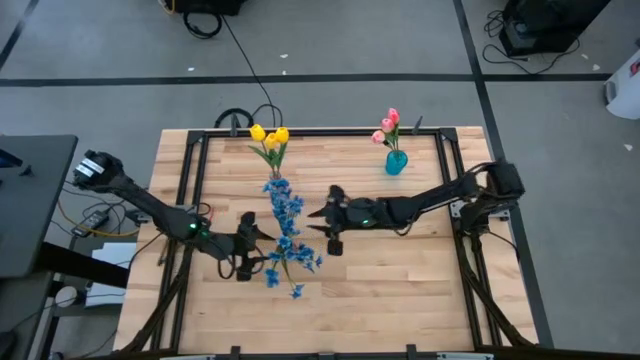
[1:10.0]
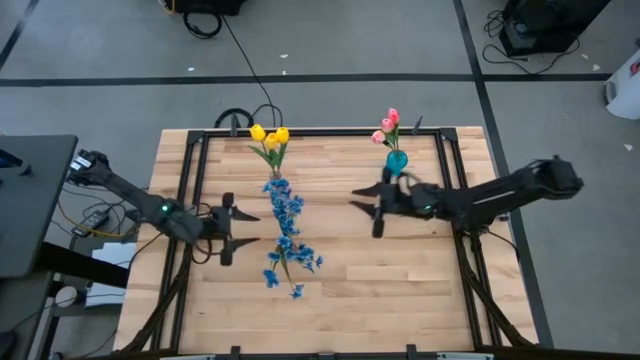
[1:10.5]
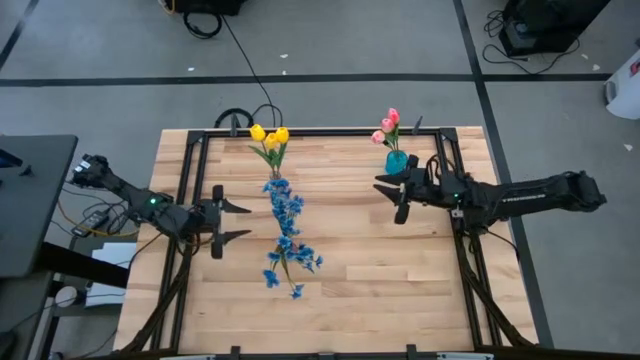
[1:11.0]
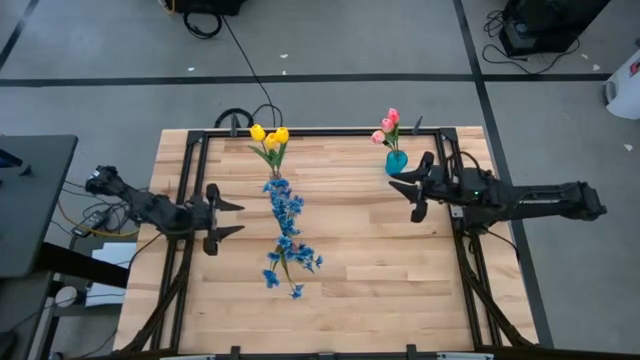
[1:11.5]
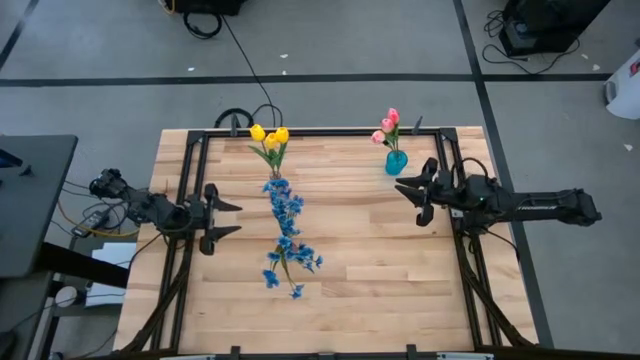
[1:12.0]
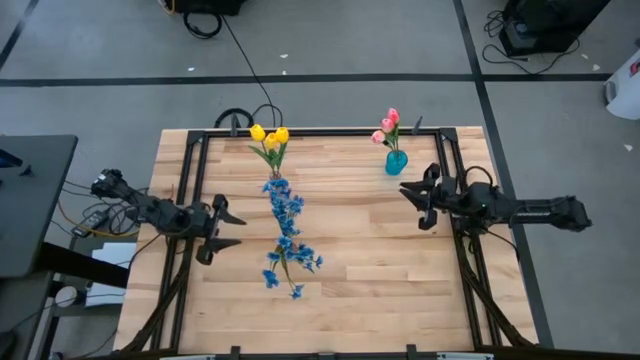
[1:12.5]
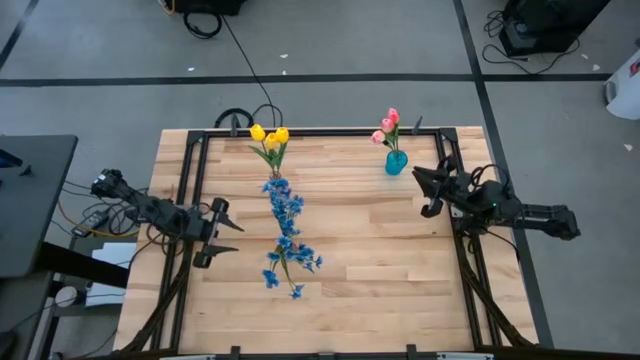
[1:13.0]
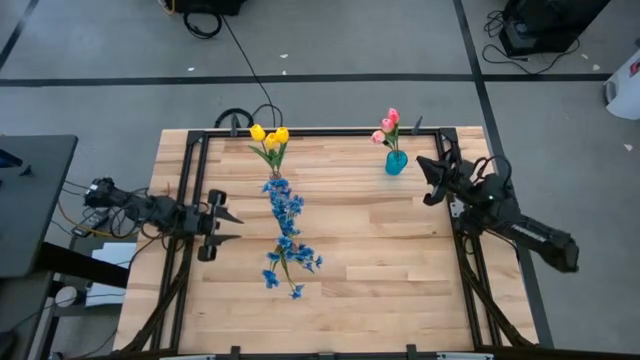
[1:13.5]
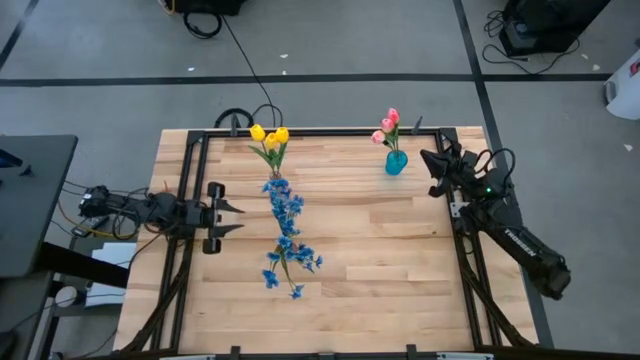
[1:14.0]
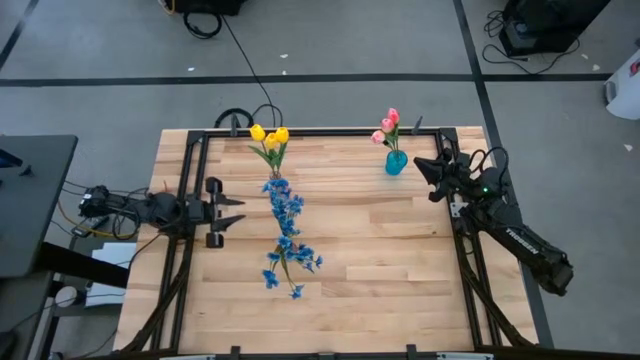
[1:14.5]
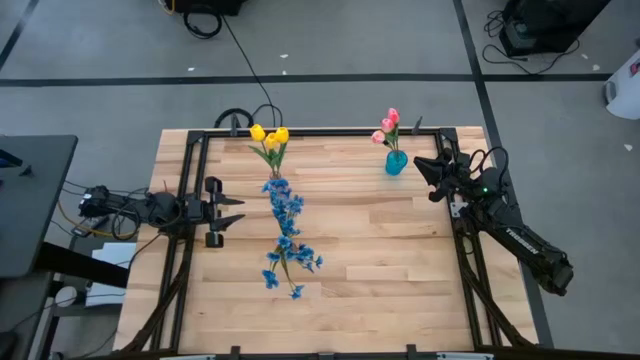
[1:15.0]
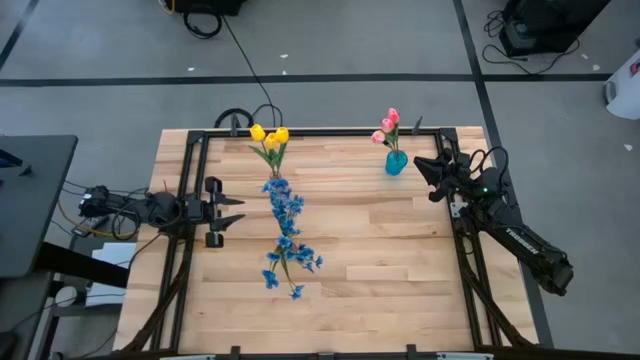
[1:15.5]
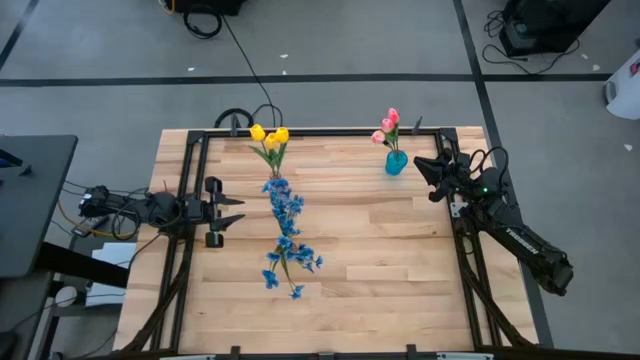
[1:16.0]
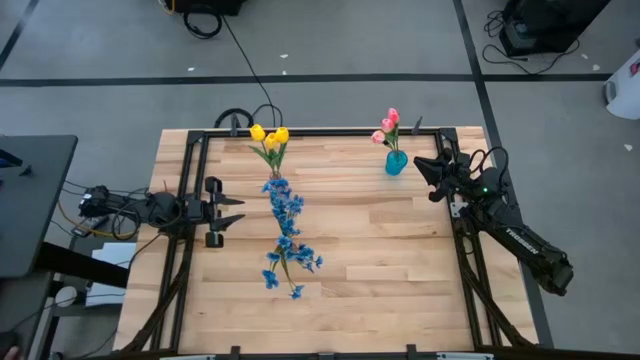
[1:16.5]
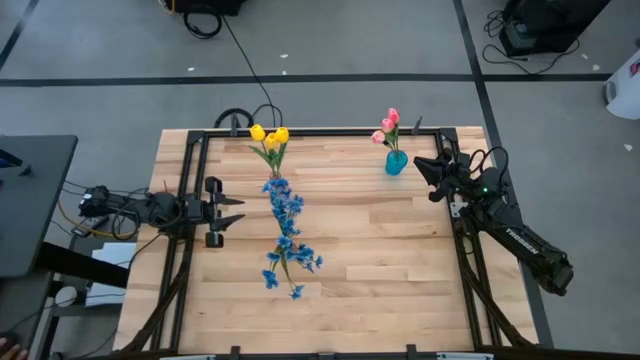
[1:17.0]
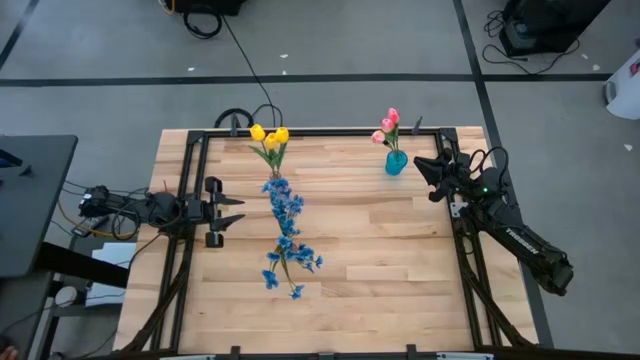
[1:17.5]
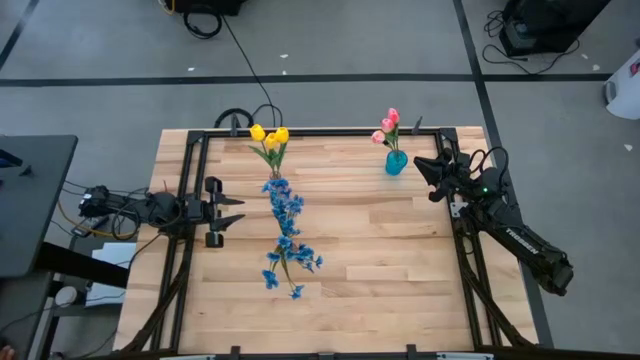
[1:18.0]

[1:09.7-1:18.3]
Task: Sort flowers into vase by color
Return to Home Position

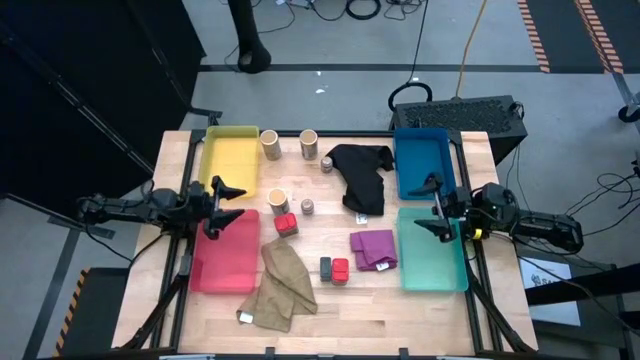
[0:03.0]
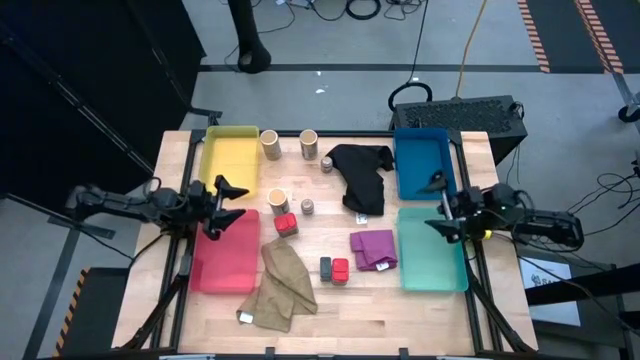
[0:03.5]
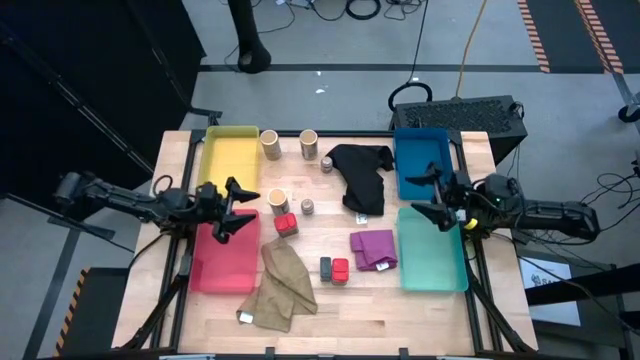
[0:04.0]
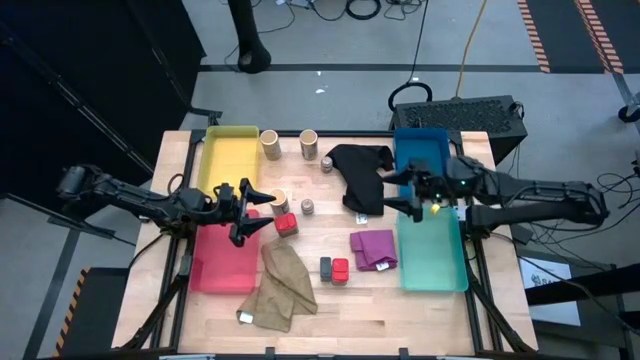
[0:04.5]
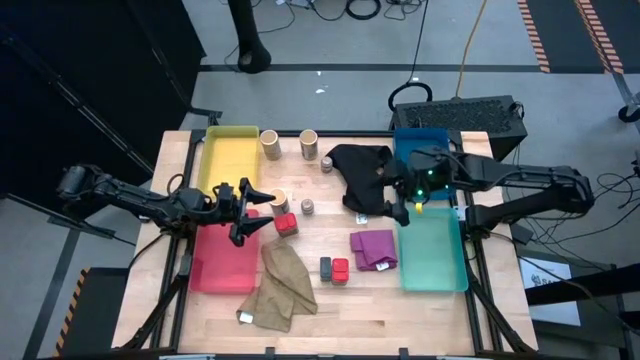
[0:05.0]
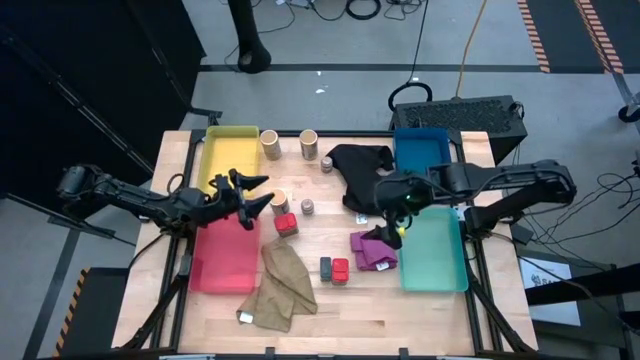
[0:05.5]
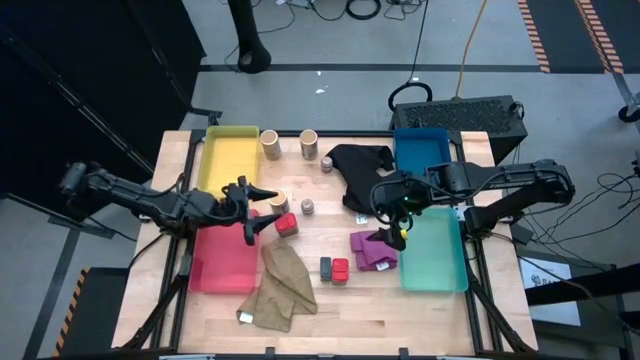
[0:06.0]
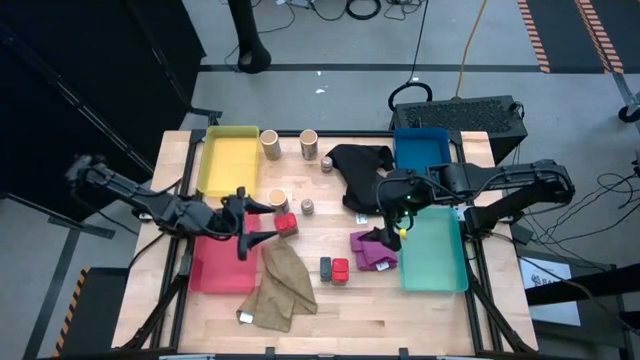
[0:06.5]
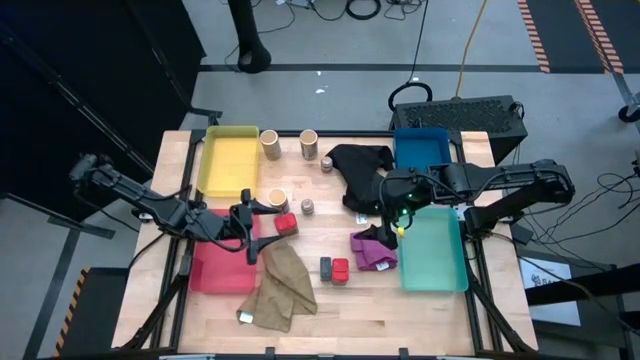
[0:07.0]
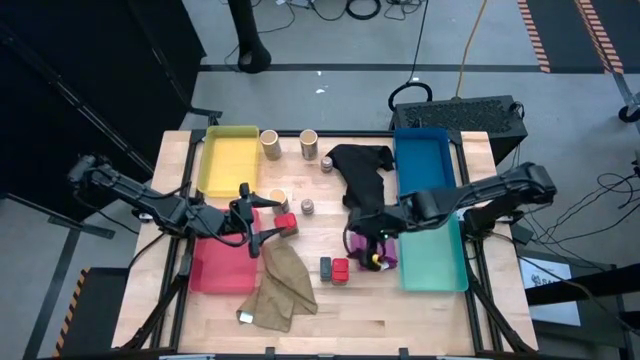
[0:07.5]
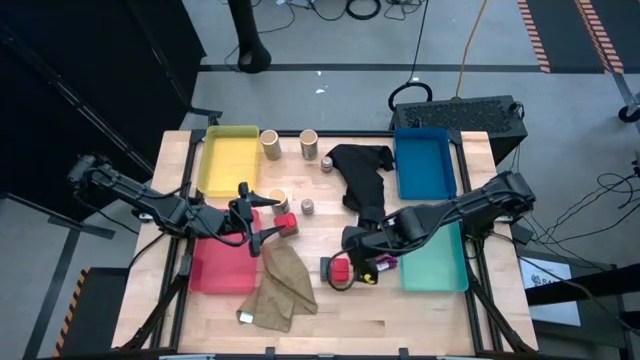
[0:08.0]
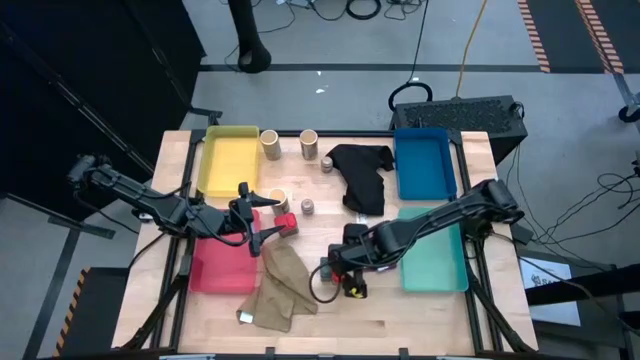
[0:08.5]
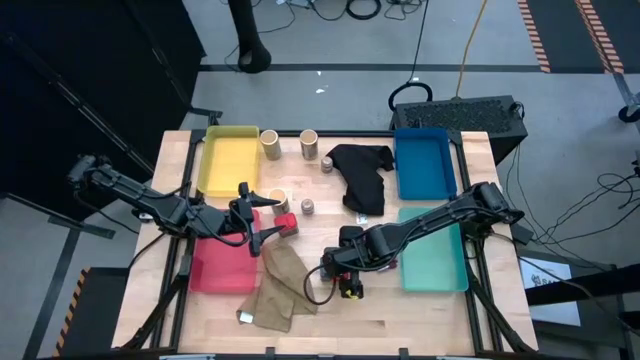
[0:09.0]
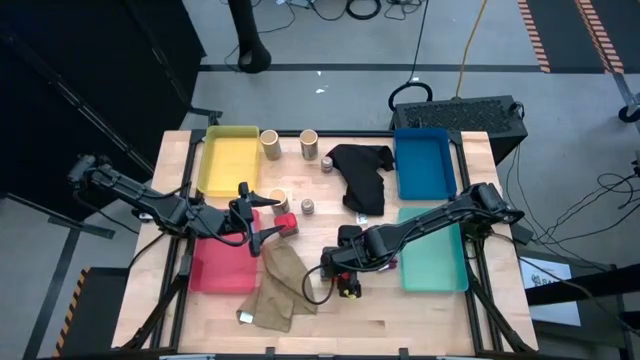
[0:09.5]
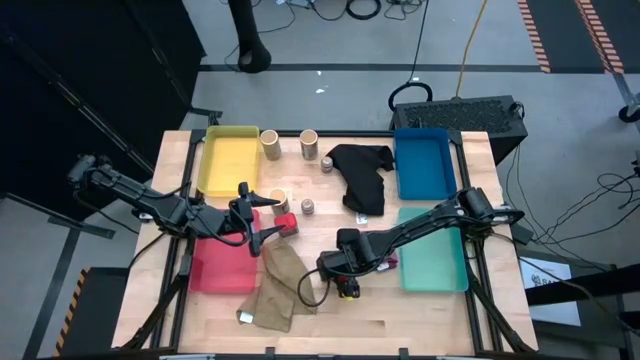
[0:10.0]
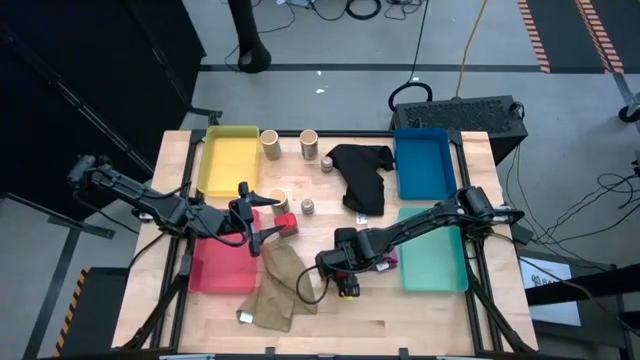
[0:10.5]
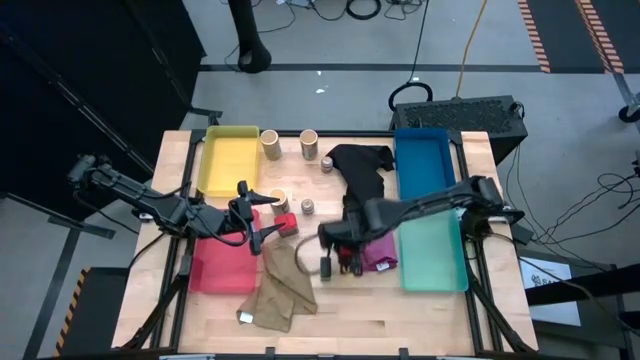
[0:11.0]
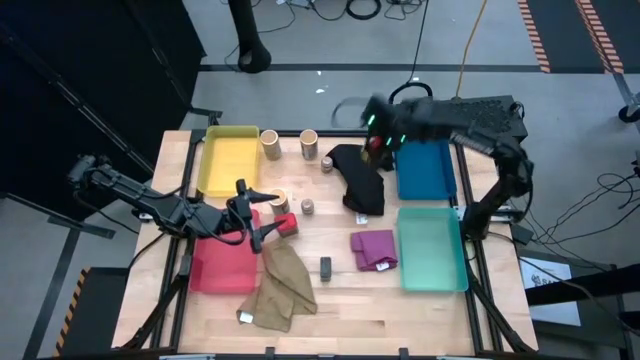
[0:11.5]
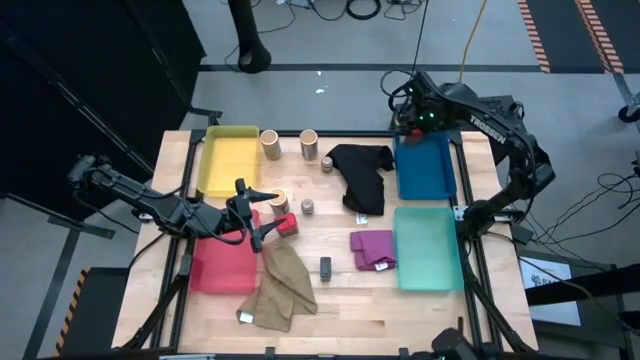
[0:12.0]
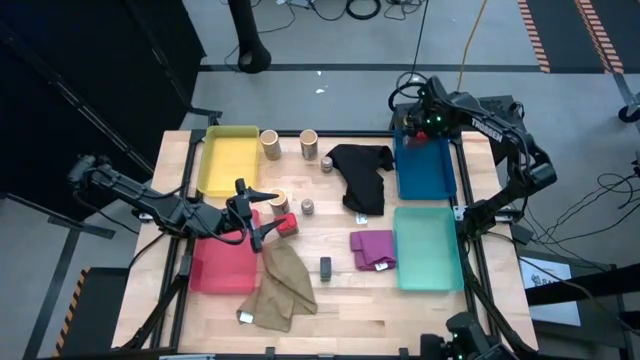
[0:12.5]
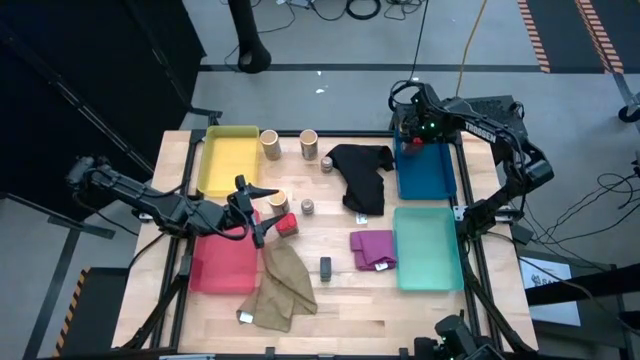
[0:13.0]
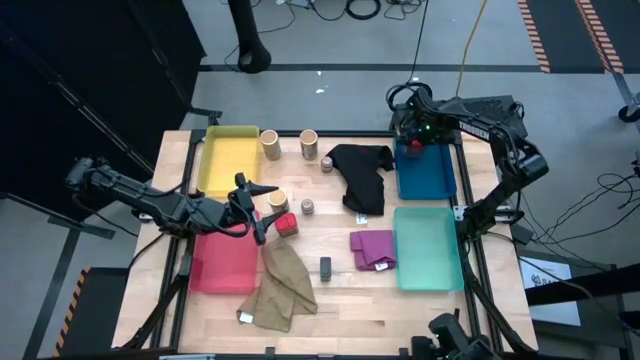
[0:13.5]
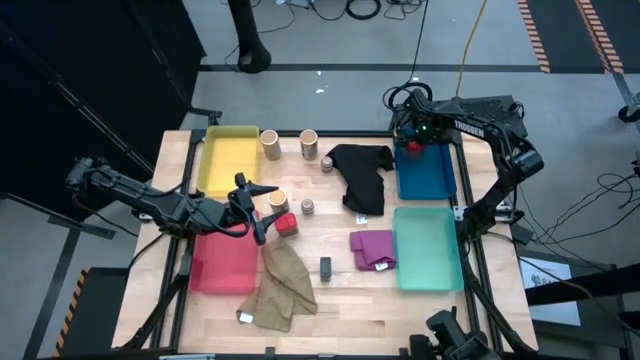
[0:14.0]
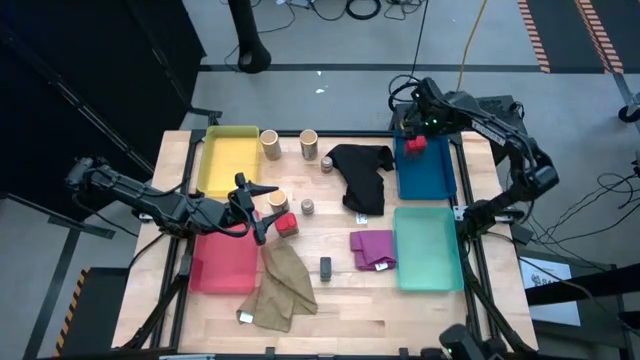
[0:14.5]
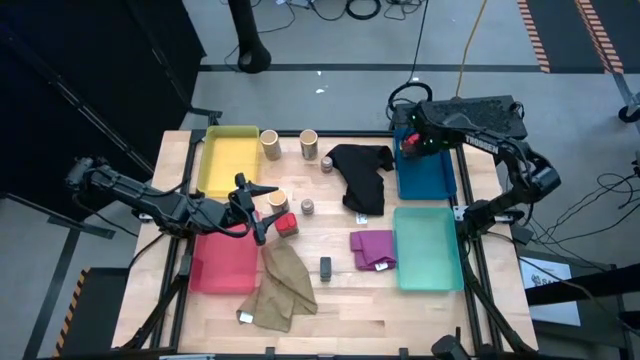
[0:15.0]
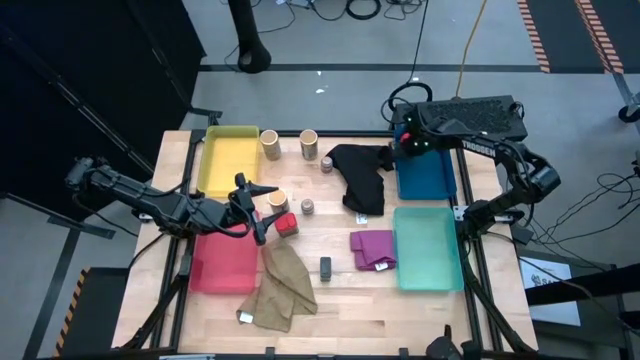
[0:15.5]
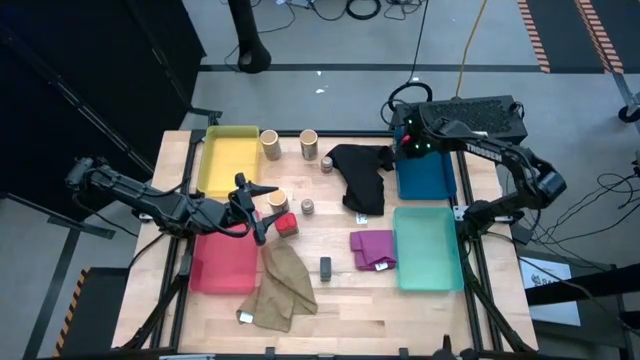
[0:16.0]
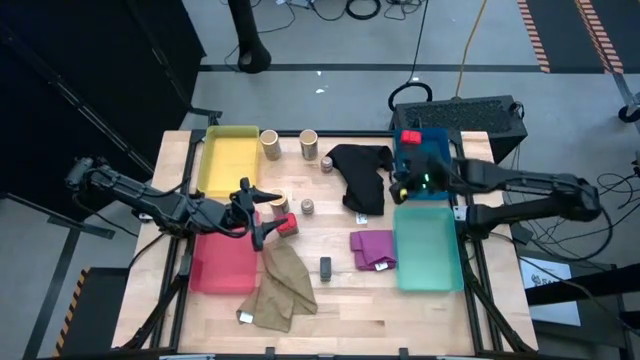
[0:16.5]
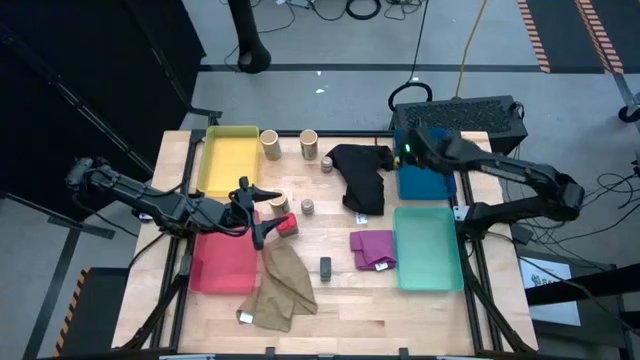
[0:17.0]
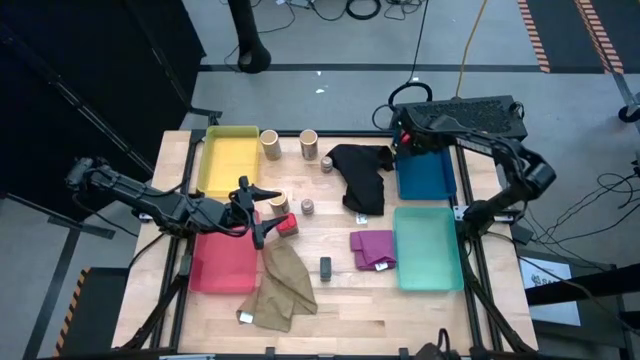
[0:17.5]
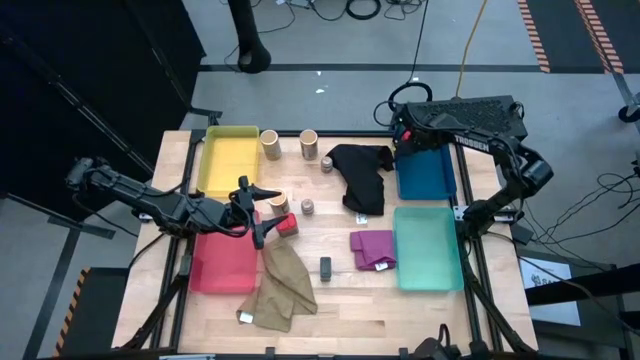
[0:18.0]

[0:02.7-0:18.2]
Task: Sort spices by type
Put the bottom red seasoning can into the dark blue bin
